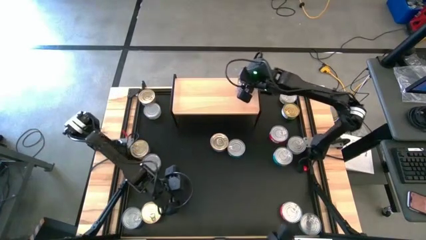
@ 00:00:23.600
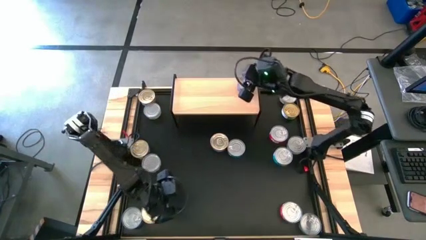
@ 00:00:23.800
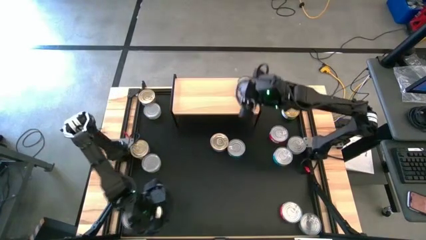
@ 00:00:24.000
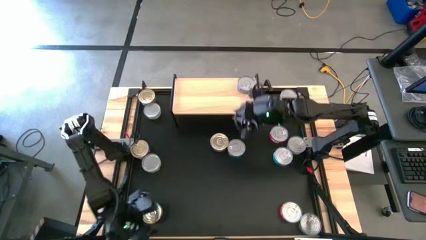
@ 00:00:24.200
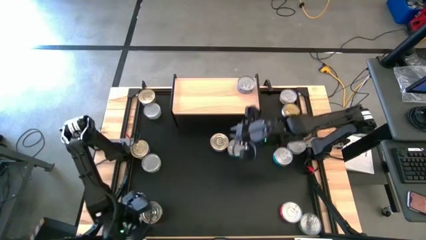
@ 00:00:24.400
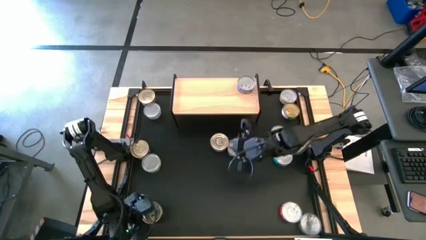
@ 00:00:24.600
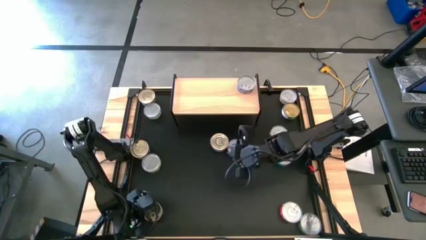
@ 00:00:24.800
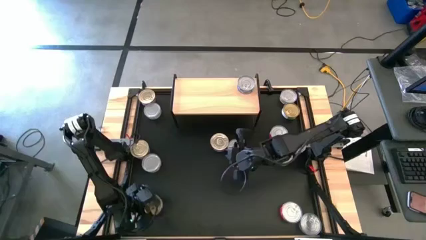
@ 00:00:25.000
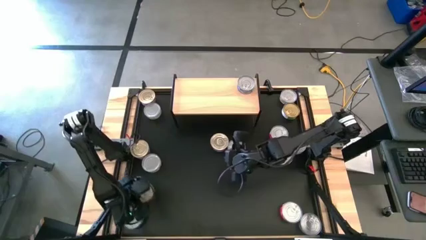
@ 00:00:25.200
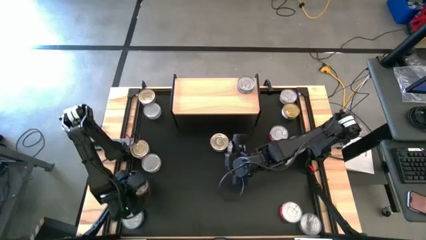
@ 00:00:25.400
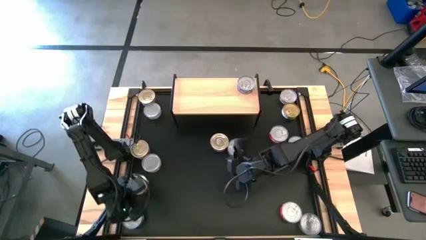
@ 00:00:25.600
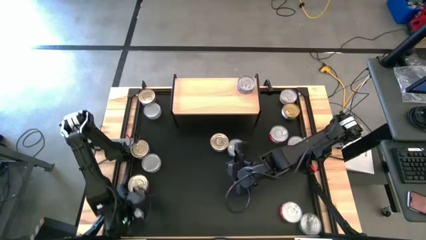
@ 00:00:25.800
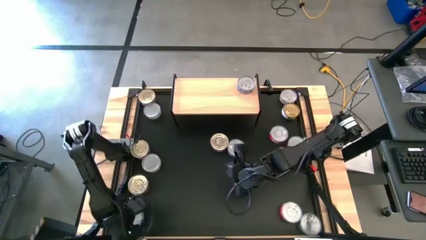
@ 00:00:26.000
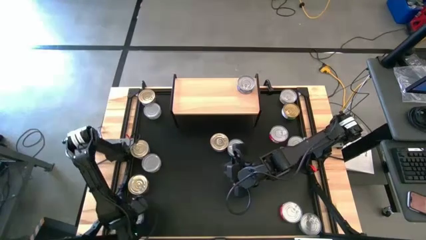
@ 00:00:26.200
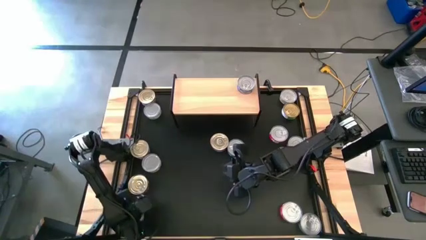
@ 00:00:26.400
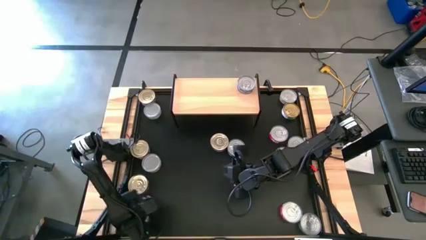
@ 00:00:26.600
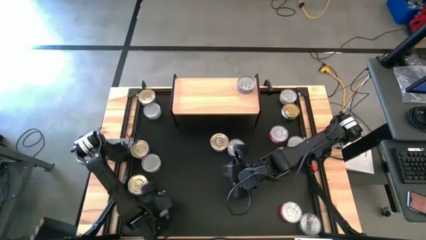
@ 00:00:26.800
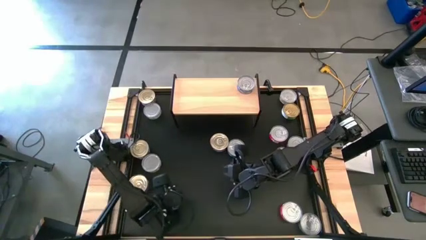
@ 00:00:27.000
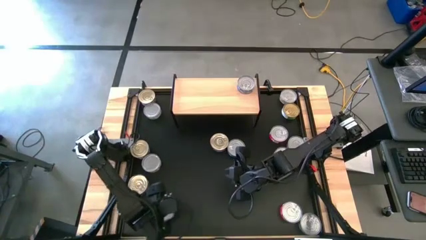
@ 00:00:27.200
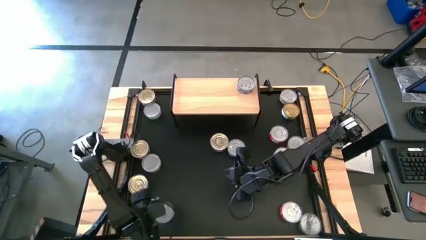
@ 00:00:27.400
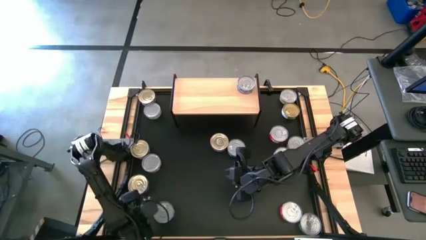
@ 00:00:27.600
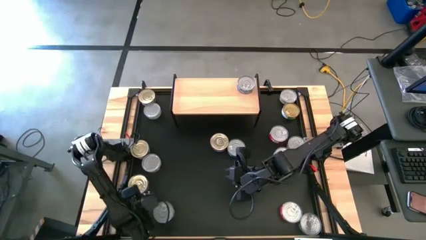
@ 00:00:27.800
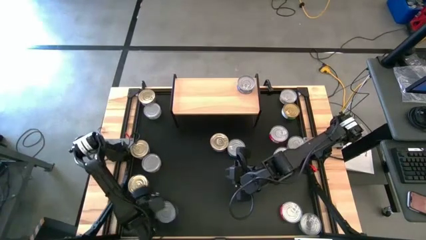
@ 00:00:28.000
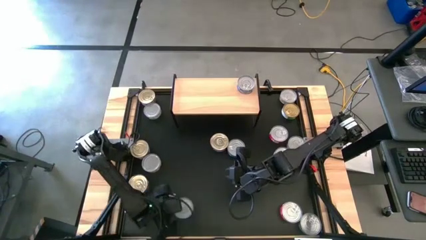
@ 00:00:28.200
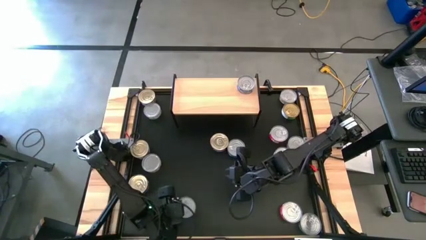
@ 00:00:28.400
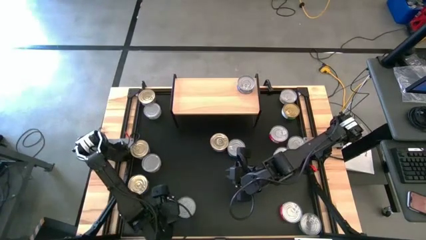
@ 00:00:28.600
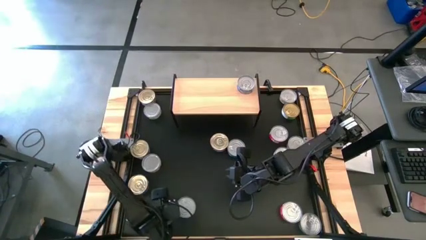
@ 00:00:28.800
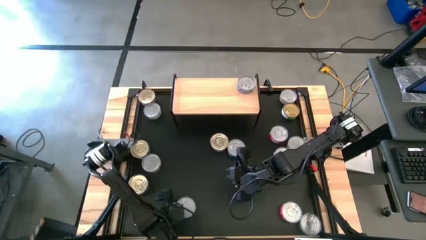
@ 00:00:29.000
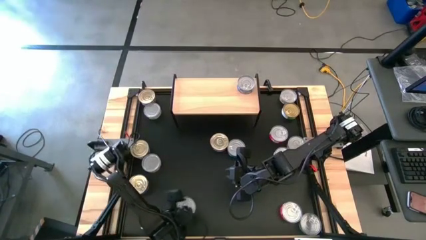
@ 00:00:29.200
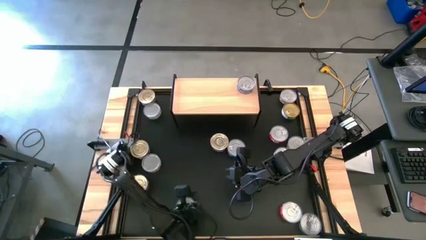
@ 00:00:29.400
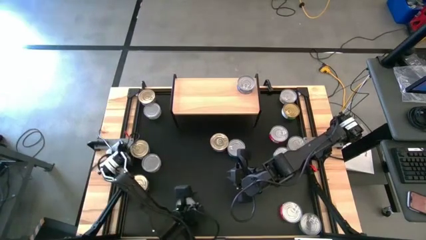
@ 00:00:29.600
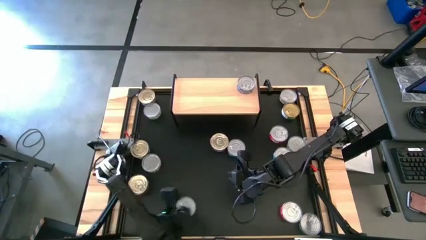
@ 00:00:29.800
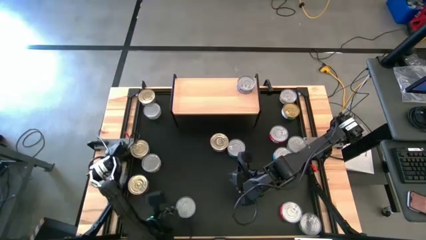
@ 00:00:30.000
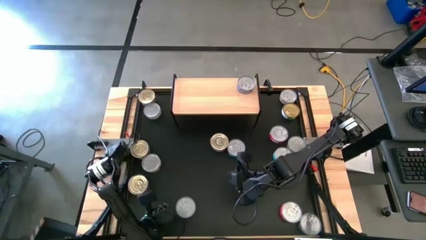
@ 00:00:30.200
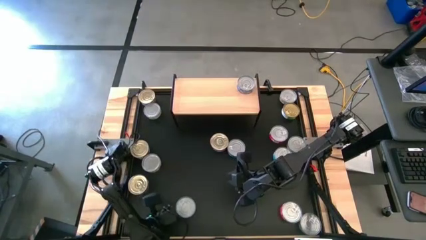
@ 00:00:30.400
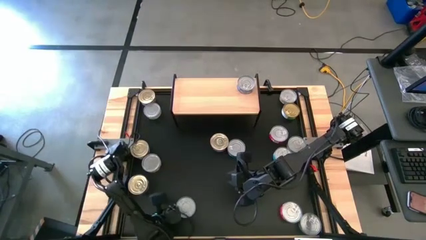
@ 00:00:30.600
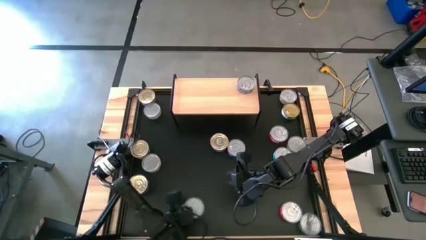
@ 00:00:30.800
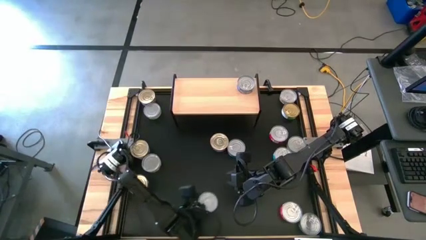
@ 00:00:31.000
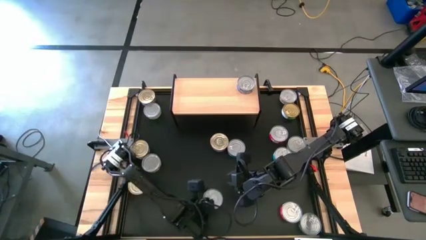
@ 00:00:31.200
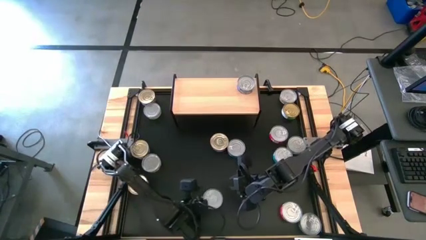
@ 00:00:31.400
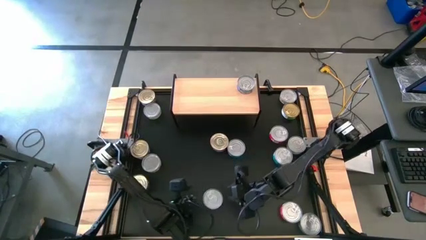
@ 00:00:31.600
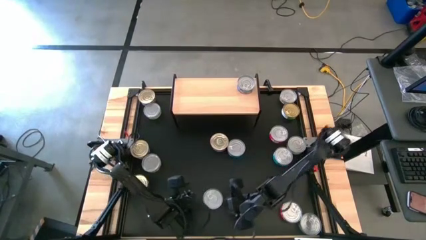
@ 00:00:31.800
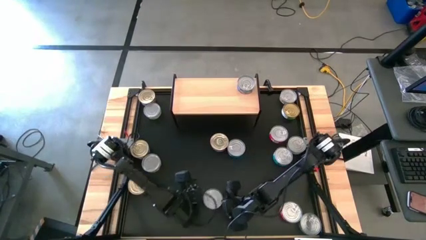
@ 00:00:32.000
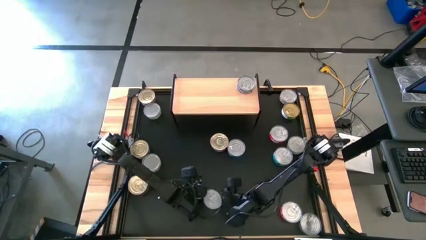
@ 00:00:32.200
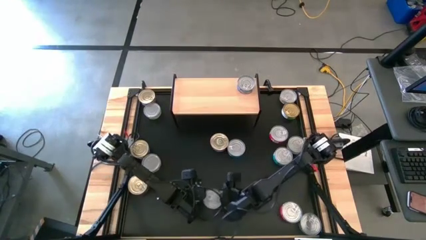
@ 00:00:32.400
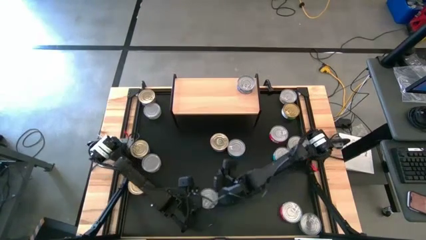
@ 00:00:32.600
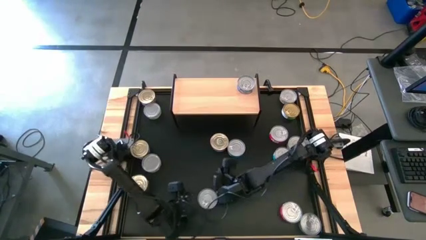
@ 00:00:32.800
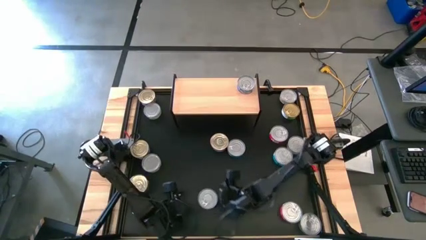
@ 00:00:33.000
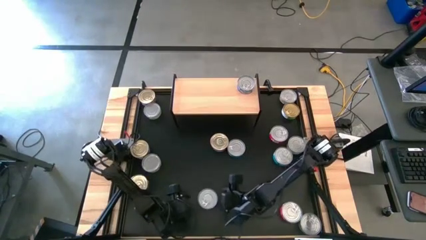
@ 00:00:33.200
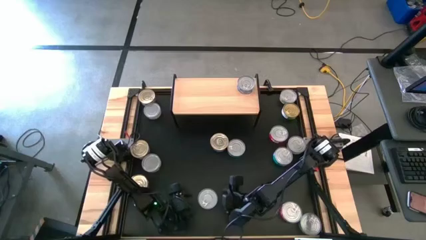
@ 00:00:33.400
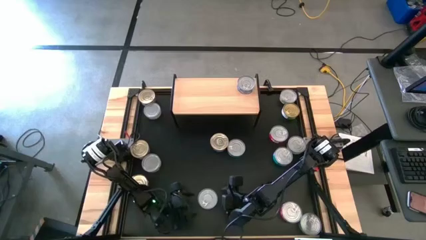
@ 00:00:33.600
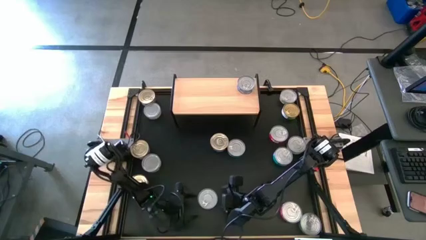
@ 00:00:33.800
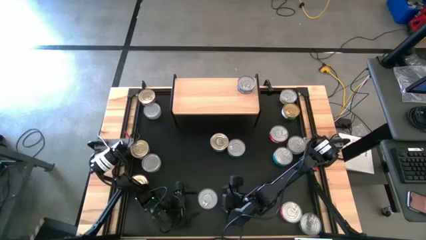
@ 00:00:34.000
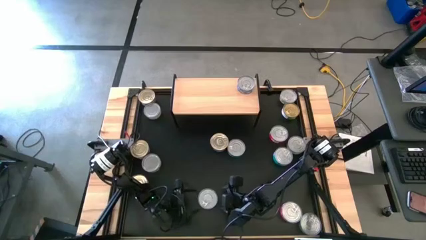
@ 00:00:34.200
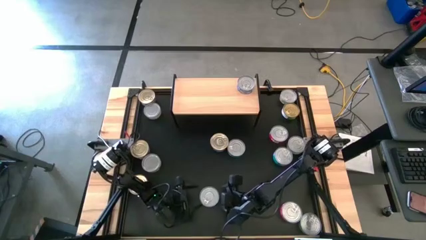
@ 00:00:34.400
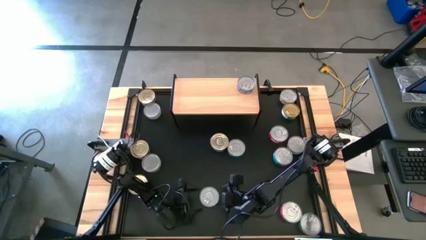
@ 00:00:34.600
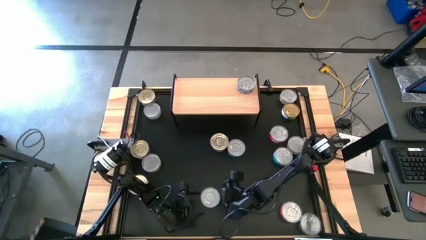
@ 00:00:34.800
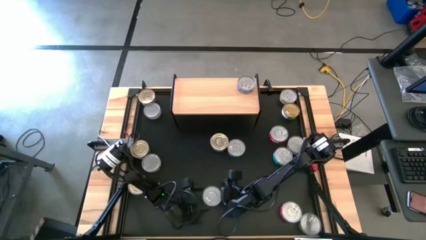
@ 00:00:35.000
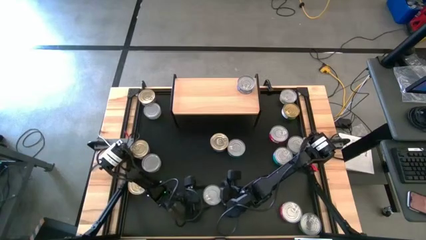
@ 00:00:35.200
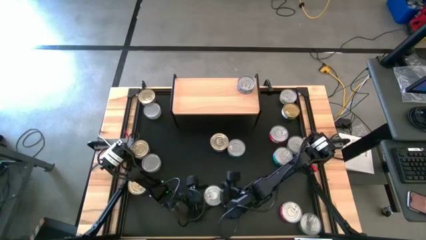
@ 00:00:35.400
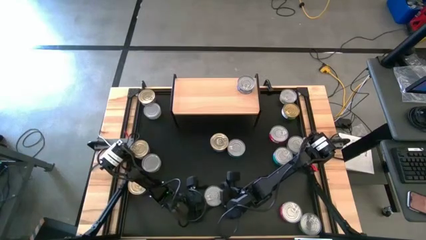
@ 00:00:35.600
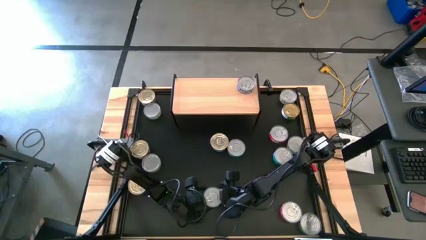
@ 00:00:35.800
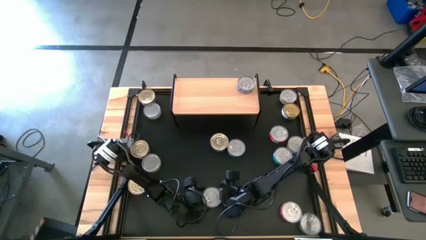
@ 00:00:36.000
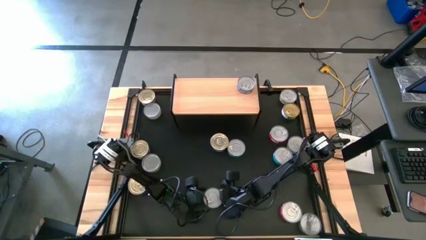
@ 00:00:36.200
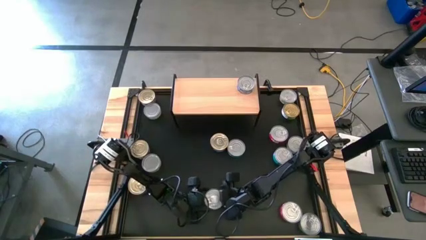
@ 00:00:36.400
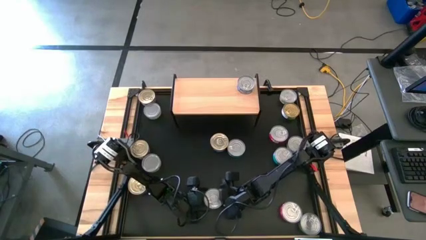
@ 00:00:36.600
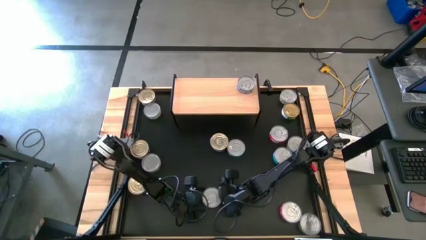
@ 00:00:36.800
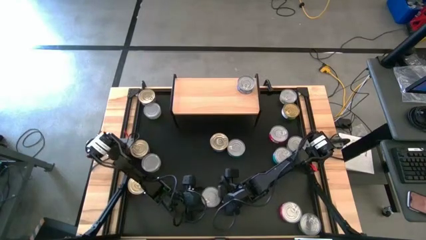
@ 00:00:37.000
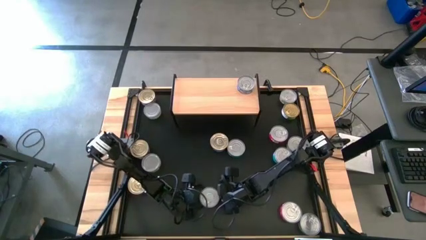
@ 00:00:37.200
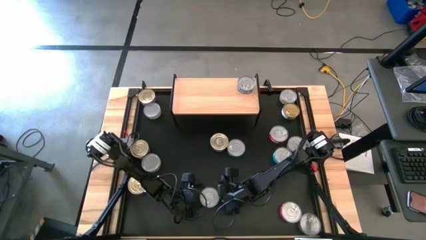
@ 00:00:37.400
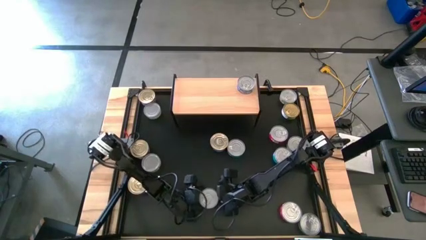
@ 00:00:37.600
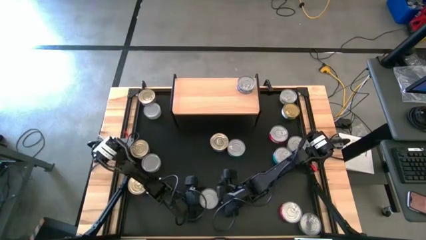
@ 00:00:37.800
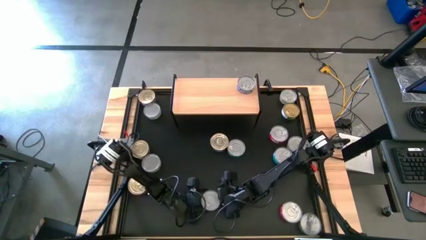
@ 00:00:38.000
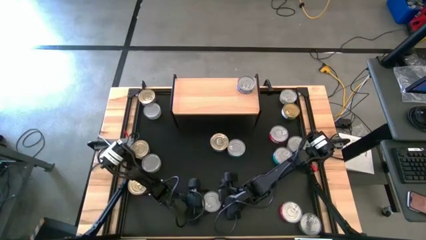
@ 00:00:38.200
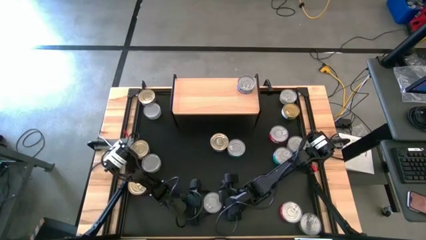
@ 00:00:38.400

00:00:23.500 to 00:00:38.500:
Task: Stack canned seafood by type on shelf
Stack the blue tuna can on top of the other blue tuna can on the shelf
